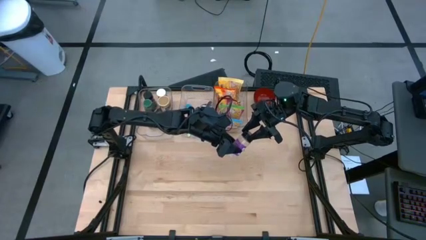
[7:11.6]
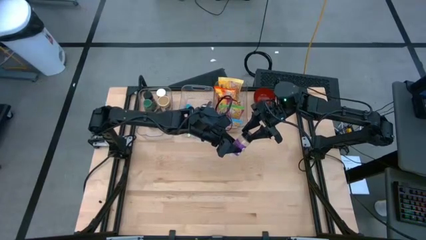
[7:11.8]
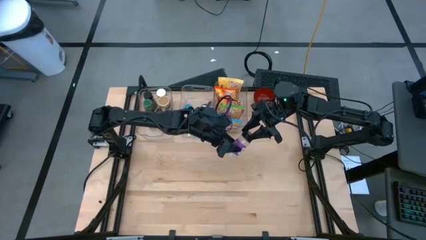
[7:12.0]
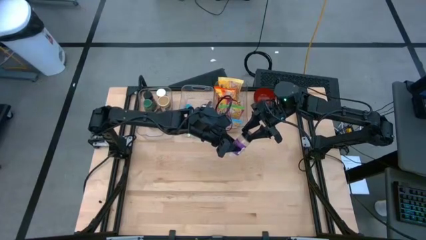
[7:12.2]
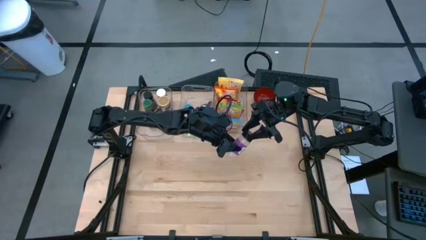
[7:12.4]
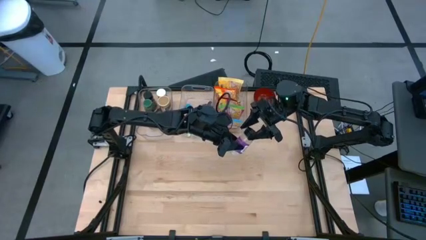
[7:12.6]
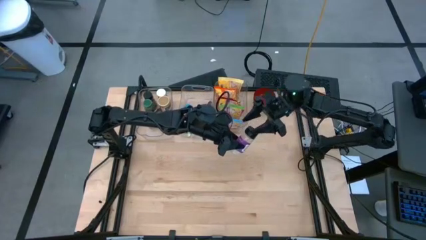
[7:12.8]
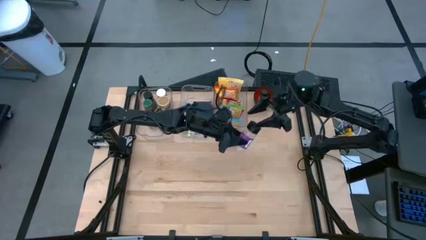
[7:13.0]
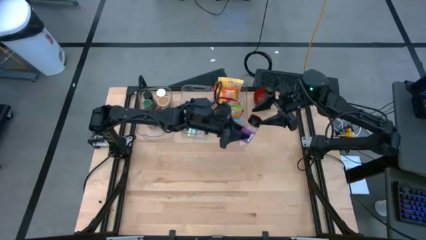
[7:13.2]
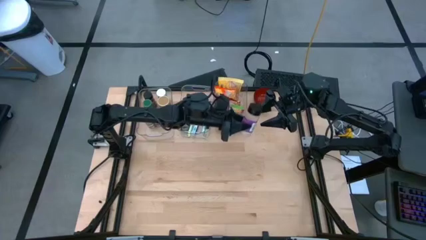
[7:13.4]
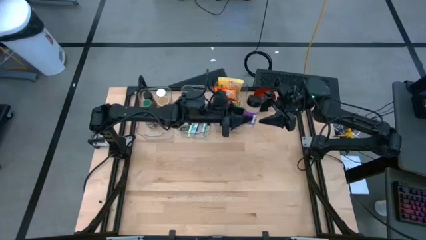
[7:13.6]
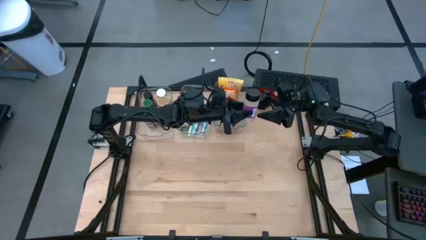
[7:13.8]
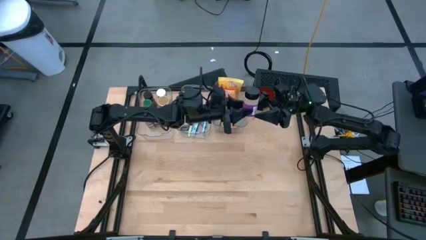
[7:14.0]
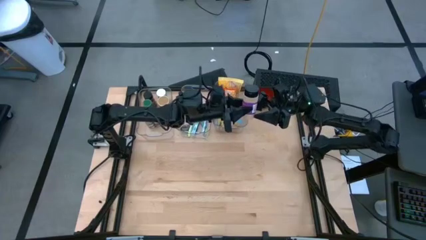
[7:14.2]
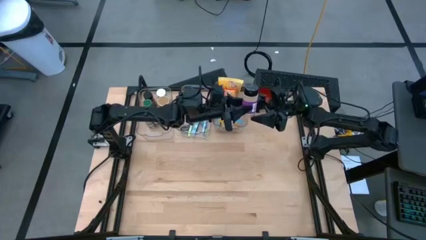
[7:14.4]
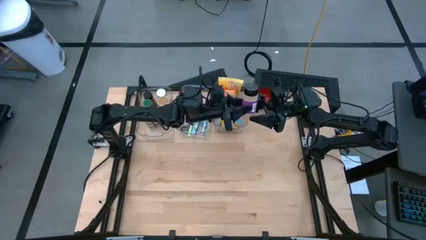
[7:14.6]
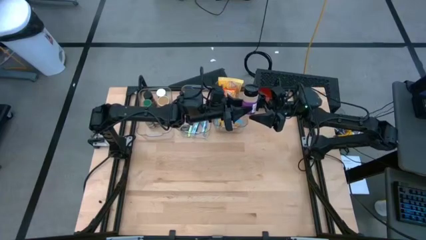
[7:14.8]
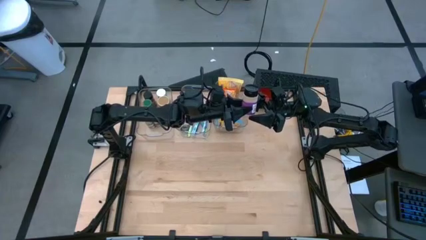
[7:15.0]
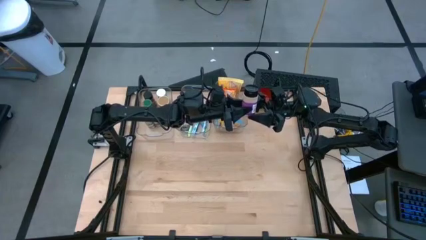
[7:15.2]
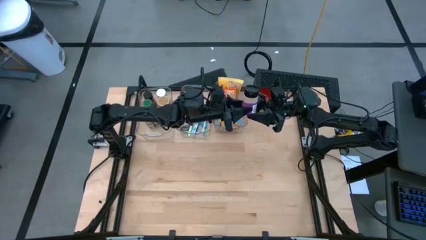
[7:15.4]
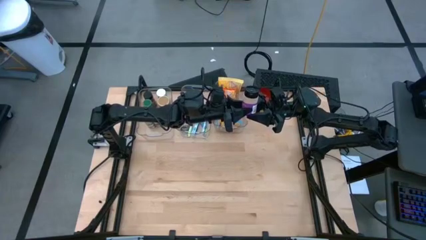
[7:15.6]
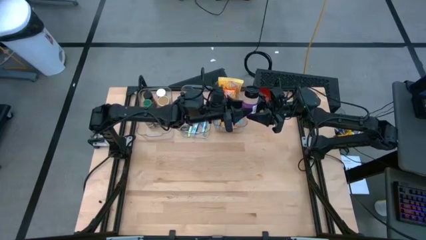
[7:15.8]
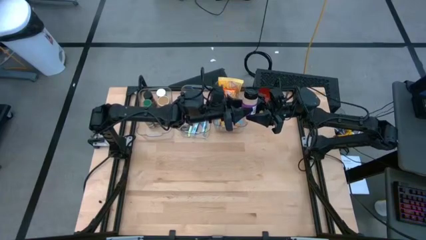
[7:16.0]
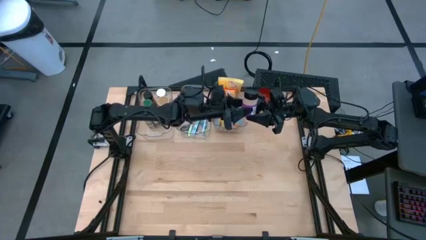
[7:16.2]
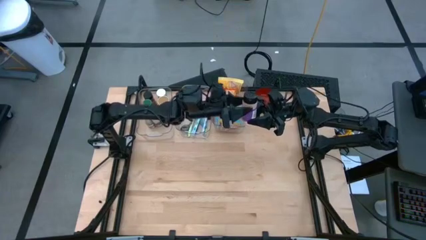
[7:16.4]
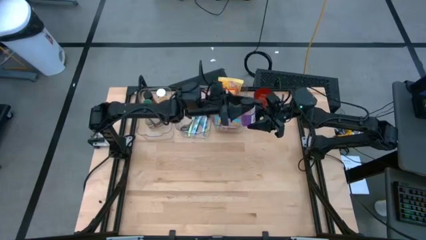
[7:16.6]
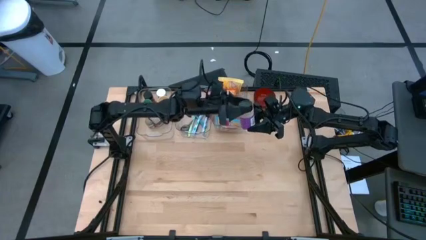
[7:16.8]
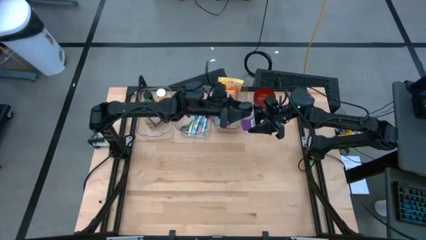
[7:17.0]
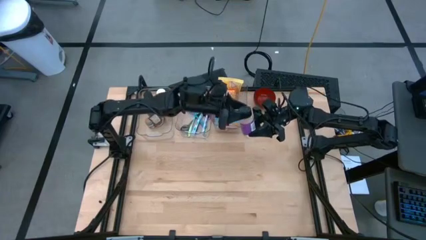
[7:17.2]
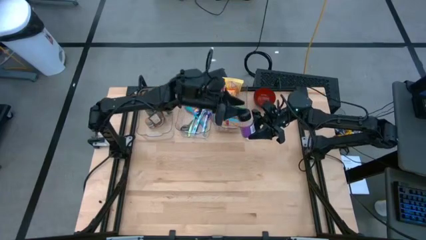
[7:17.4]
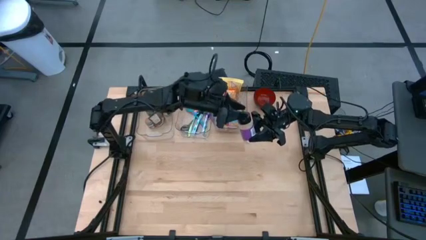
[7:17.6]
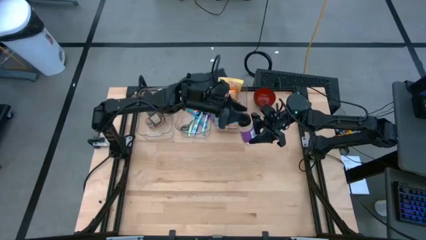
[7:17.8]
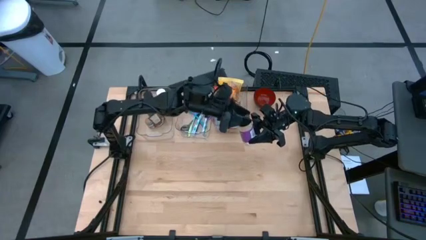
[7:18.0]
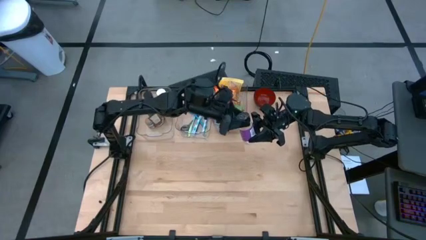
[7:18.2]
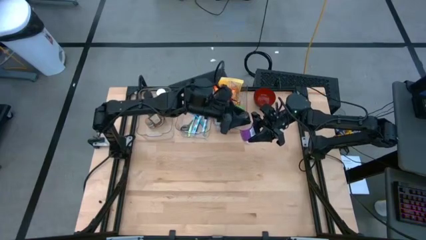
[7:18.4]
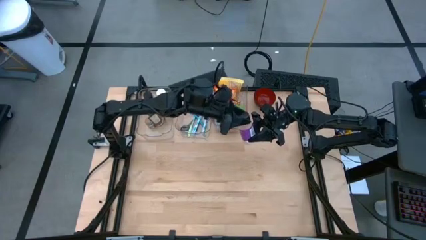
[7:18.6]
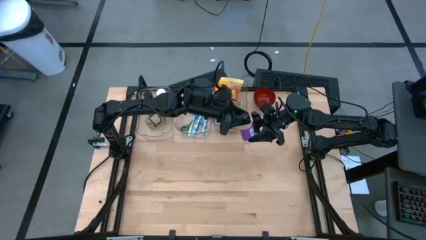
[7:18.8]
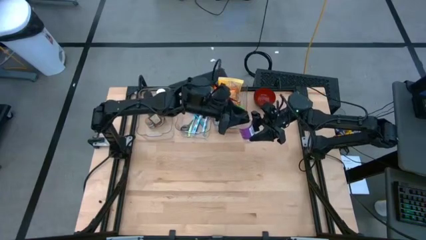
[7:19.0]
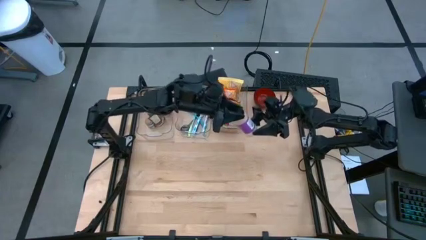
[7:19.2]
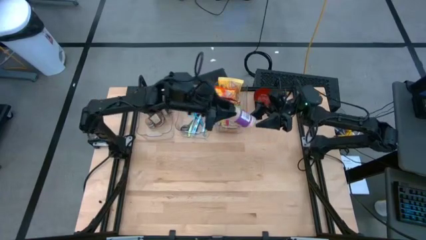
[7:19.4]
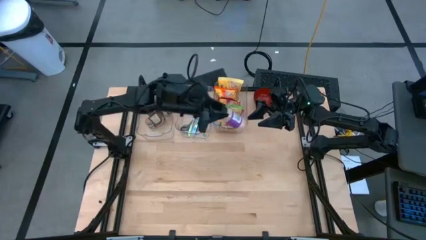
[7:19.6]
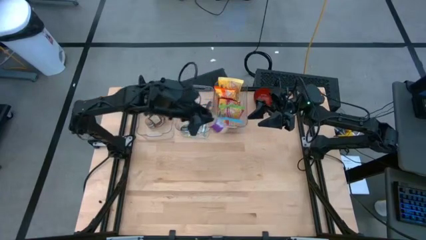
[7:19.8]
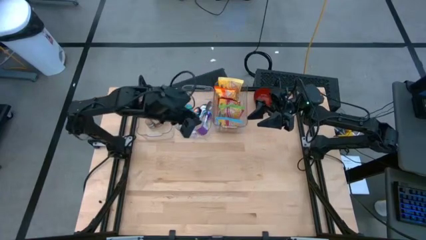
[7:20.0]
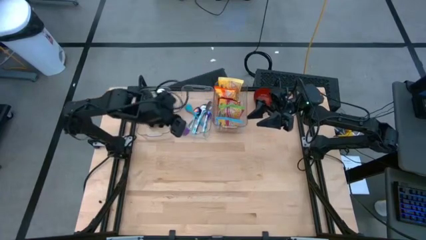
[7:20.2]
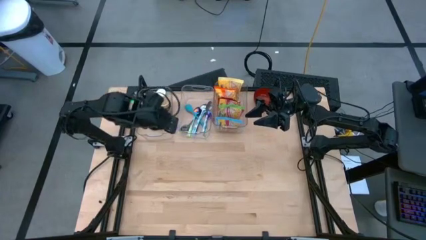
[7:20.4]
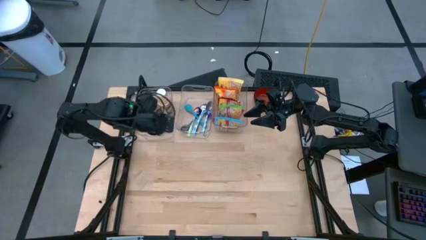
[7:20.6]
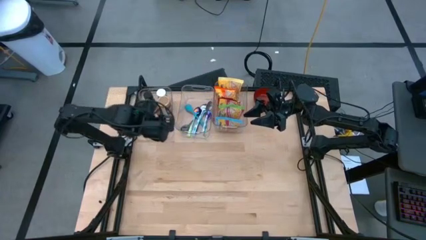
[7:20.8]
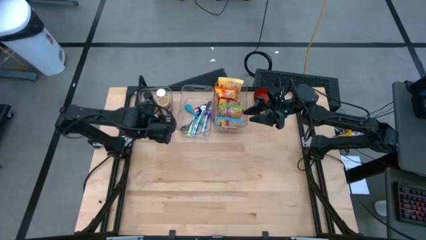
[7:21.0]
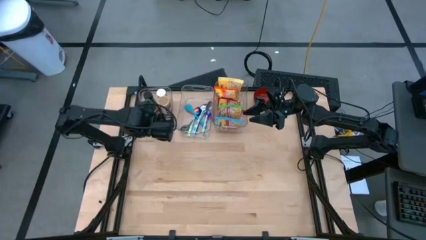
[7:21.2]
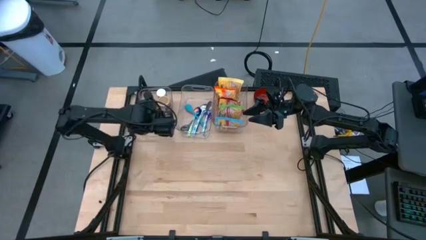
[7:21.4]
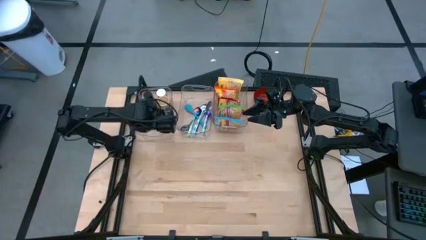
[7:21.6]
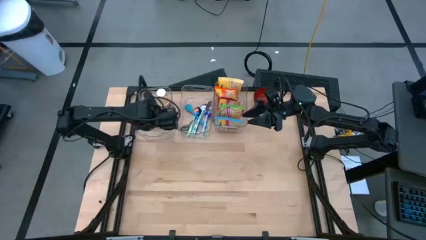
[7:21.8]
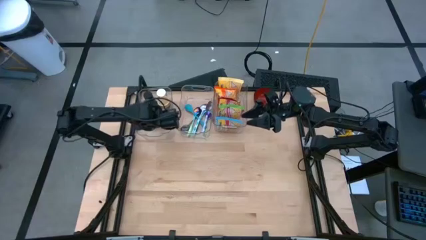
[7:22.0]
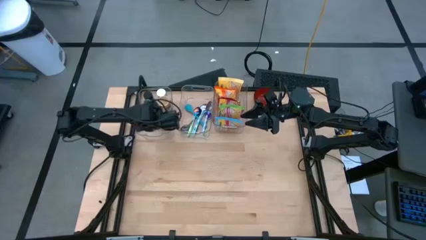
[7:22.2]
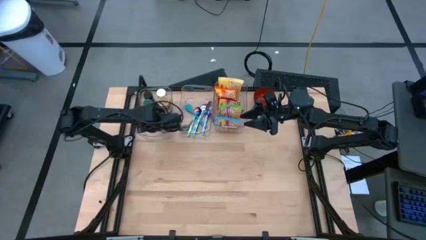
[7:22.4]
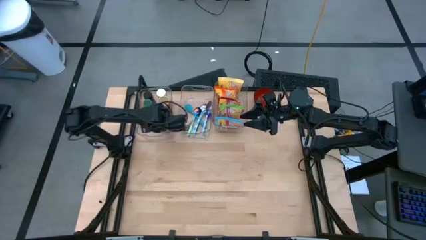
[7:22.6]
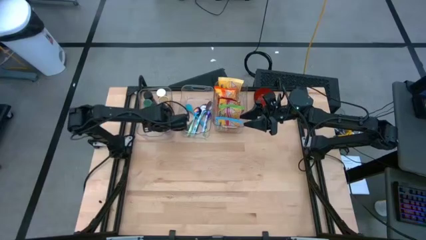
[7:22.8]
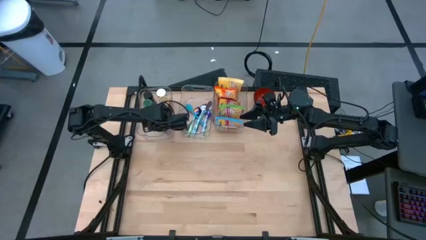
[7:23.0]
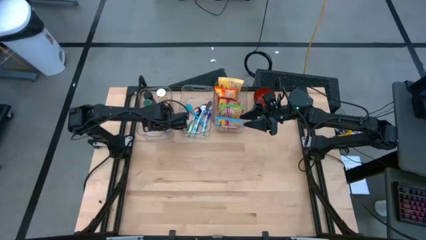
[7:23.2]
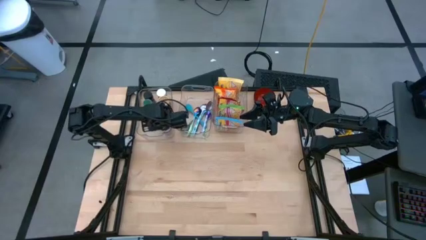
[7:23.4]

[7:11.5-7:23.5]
Task: Pick & Place Food Item
Put the purple spice bottle into the left transparent bin
